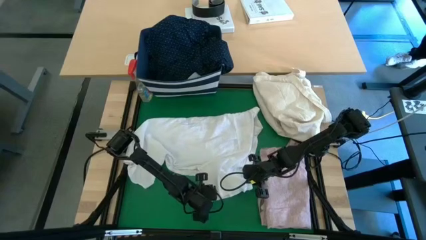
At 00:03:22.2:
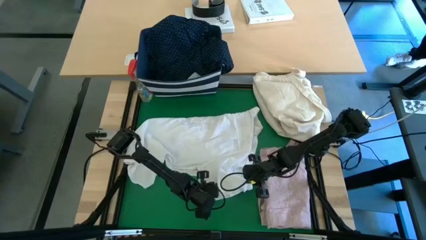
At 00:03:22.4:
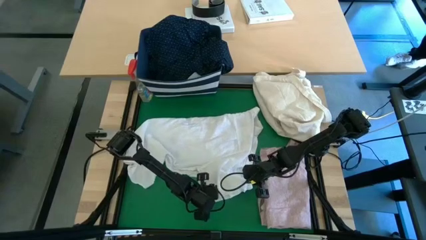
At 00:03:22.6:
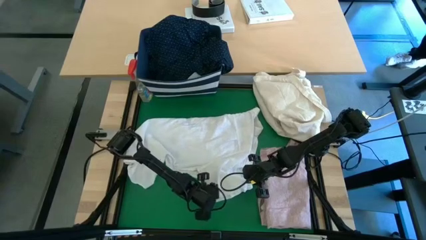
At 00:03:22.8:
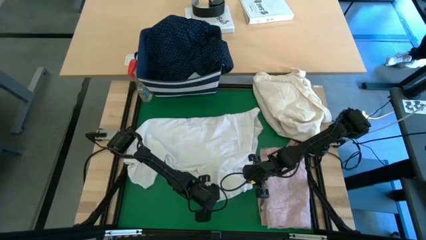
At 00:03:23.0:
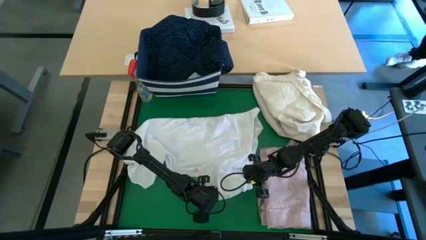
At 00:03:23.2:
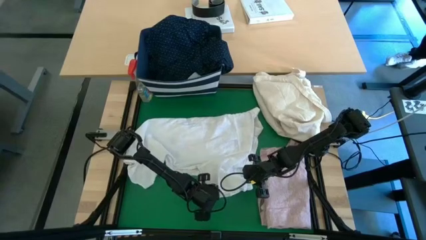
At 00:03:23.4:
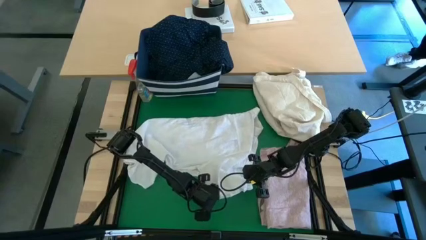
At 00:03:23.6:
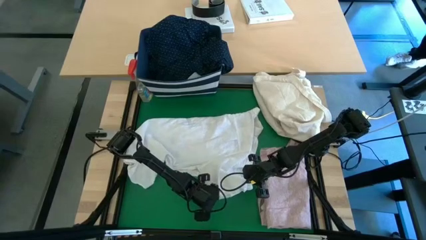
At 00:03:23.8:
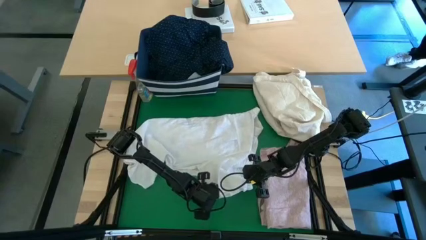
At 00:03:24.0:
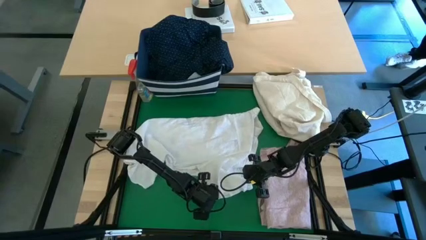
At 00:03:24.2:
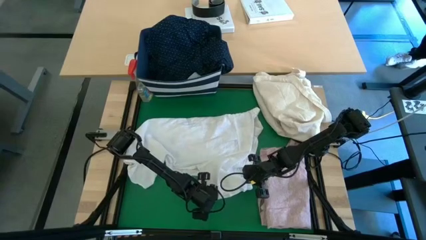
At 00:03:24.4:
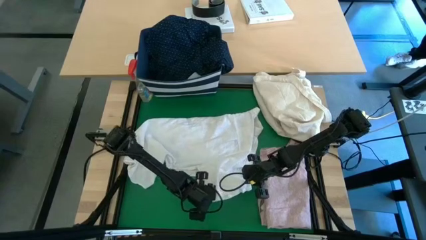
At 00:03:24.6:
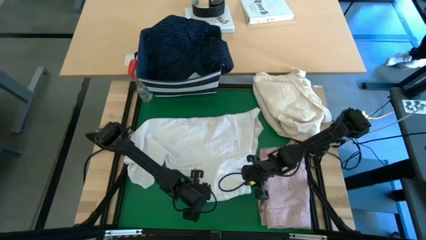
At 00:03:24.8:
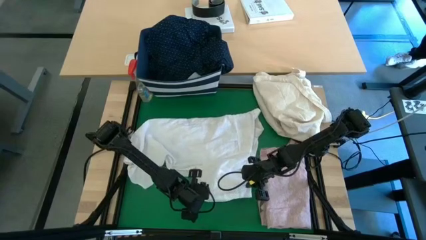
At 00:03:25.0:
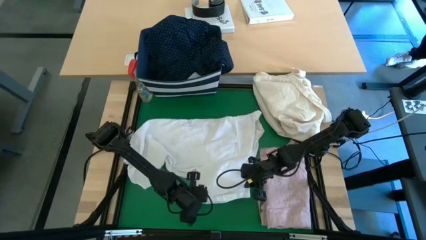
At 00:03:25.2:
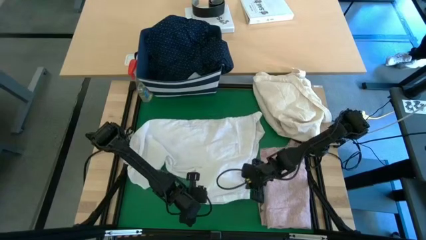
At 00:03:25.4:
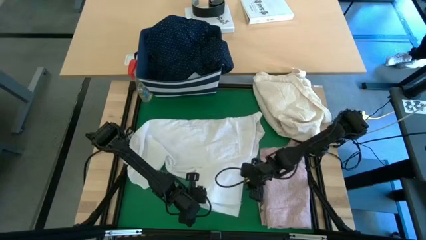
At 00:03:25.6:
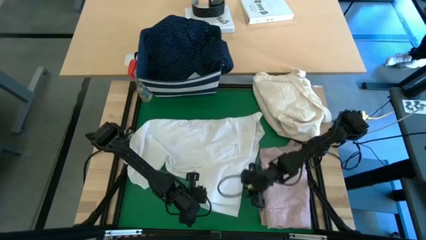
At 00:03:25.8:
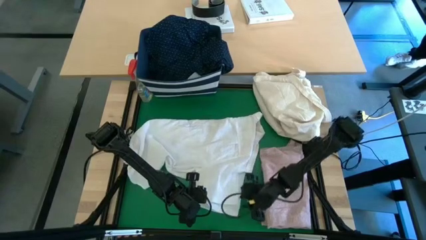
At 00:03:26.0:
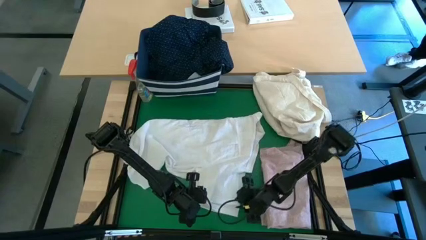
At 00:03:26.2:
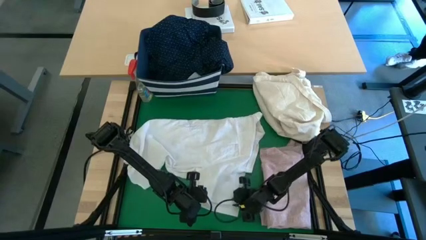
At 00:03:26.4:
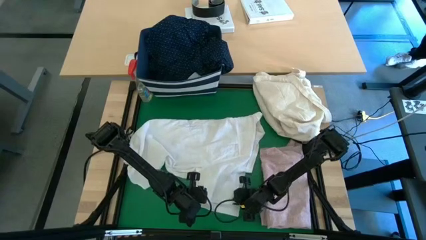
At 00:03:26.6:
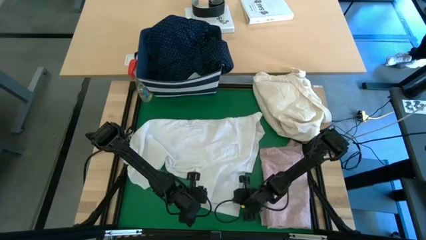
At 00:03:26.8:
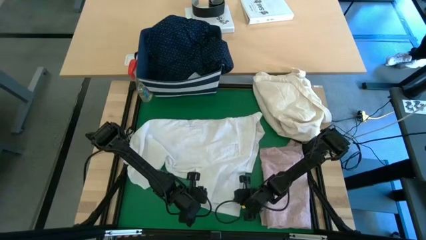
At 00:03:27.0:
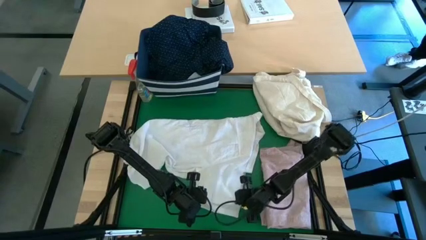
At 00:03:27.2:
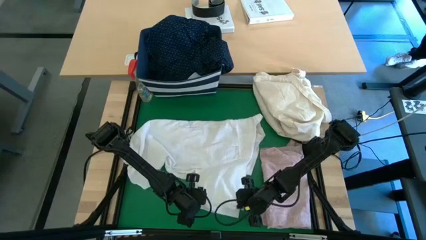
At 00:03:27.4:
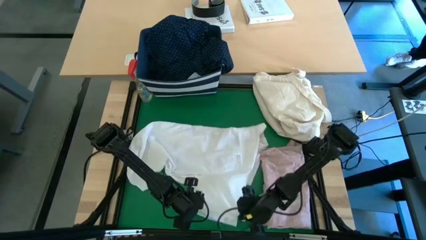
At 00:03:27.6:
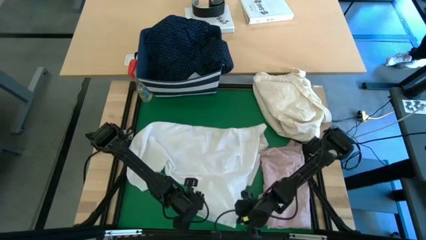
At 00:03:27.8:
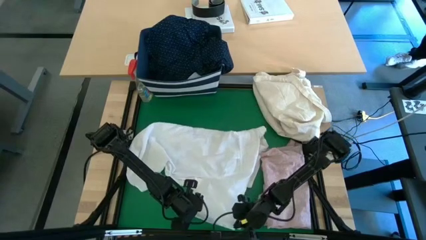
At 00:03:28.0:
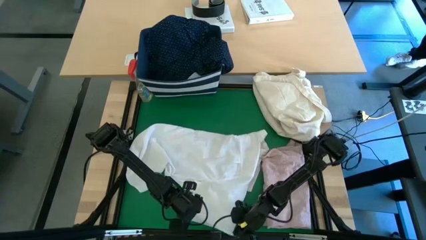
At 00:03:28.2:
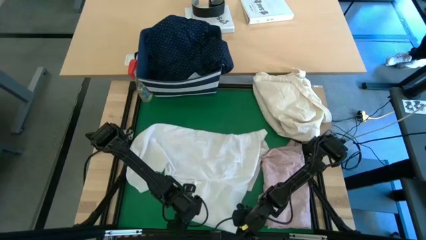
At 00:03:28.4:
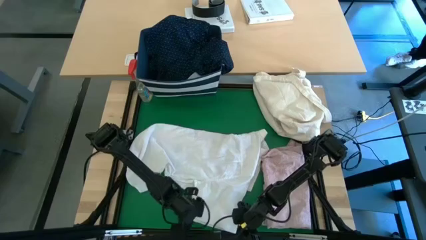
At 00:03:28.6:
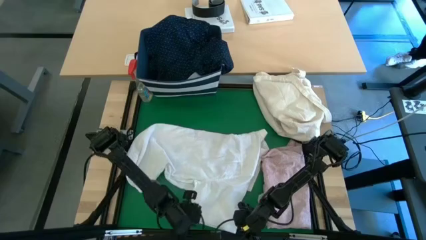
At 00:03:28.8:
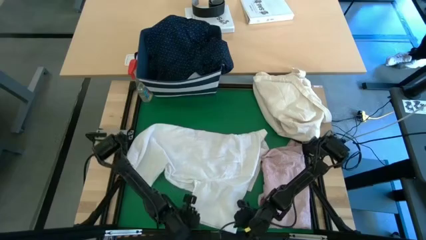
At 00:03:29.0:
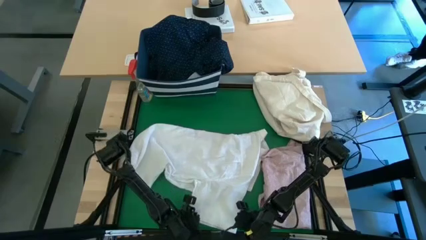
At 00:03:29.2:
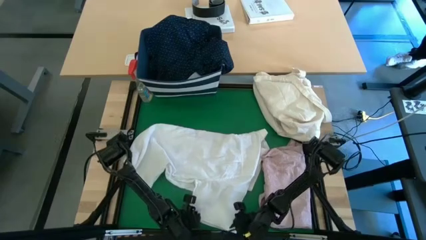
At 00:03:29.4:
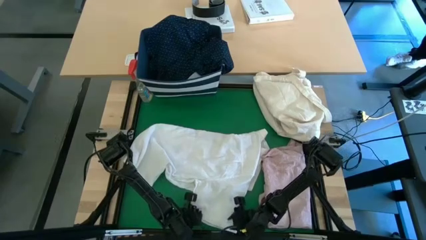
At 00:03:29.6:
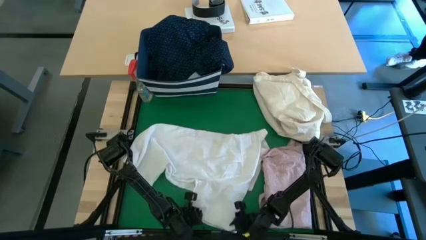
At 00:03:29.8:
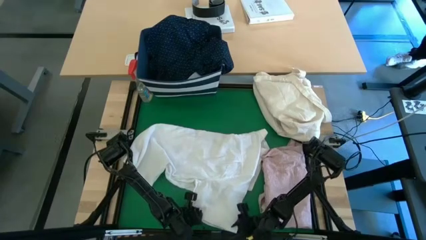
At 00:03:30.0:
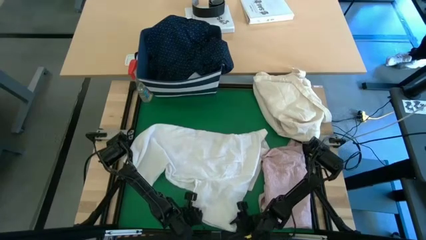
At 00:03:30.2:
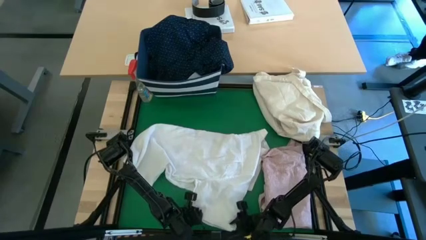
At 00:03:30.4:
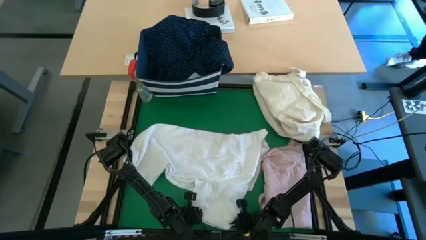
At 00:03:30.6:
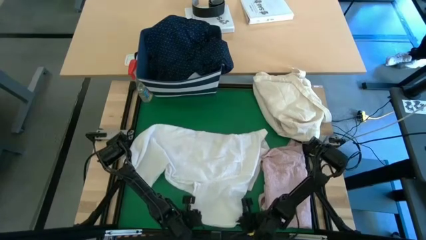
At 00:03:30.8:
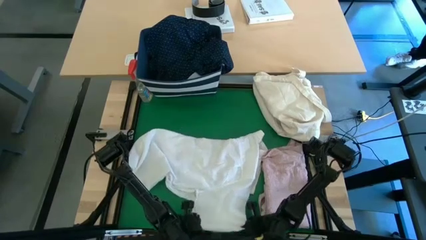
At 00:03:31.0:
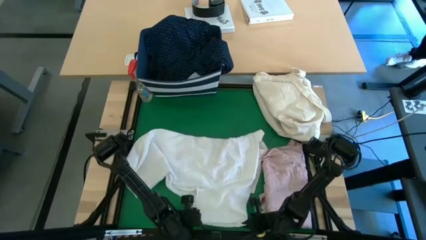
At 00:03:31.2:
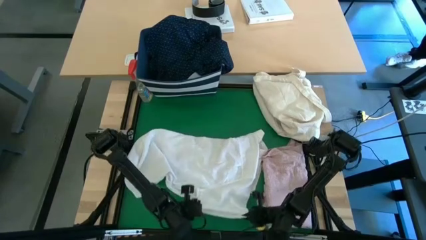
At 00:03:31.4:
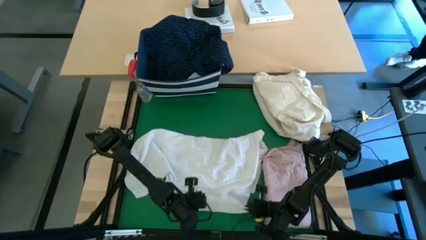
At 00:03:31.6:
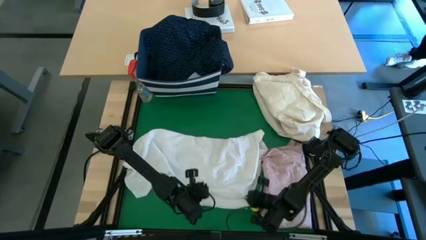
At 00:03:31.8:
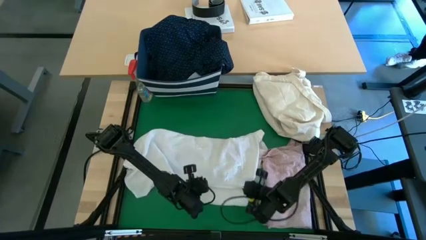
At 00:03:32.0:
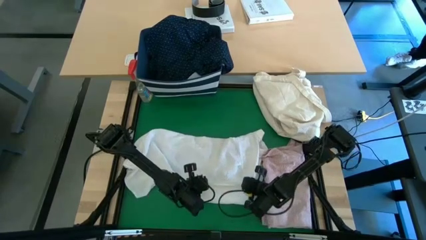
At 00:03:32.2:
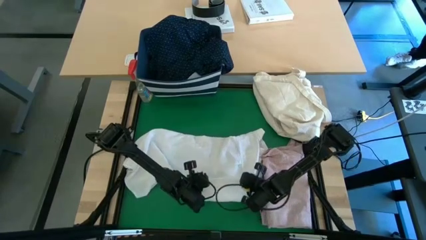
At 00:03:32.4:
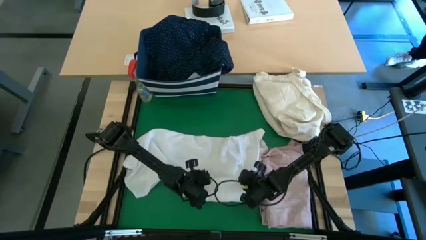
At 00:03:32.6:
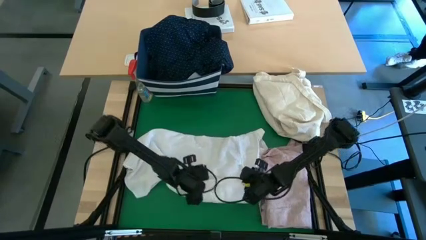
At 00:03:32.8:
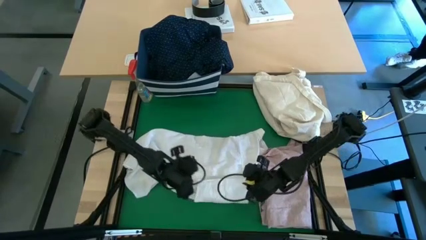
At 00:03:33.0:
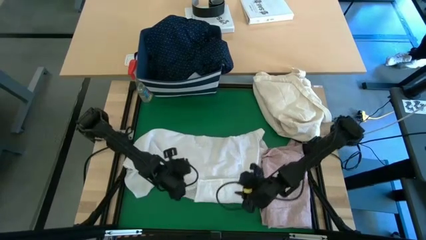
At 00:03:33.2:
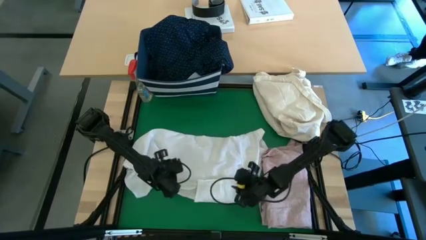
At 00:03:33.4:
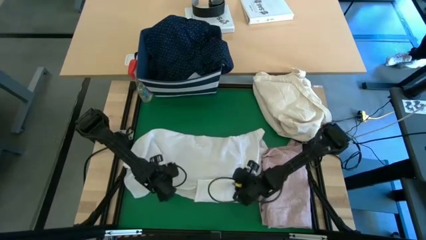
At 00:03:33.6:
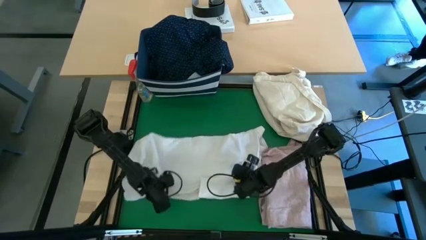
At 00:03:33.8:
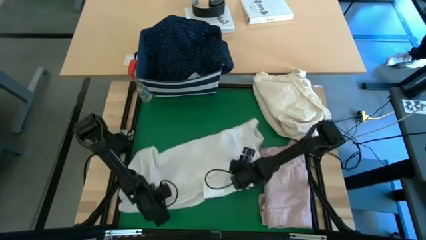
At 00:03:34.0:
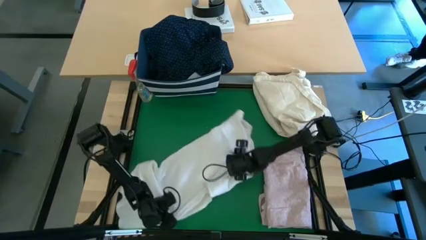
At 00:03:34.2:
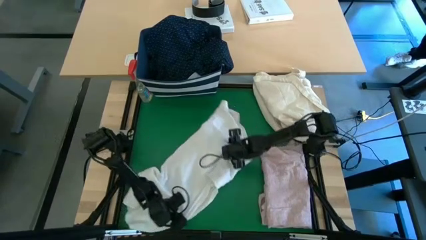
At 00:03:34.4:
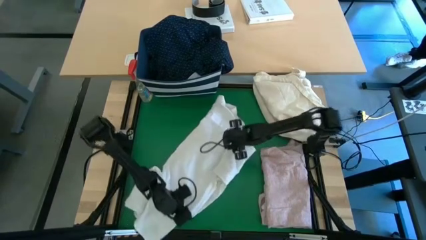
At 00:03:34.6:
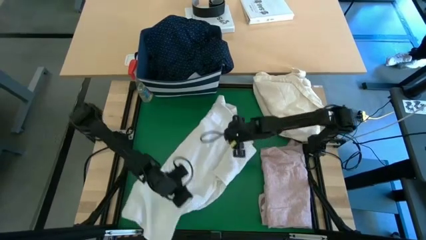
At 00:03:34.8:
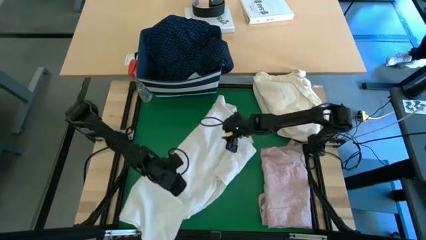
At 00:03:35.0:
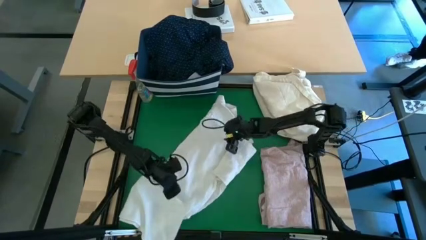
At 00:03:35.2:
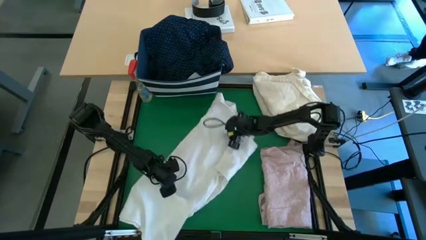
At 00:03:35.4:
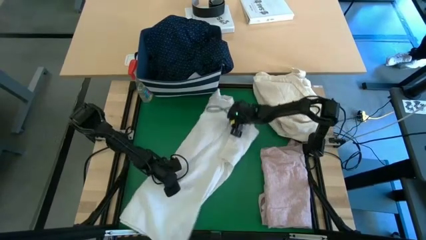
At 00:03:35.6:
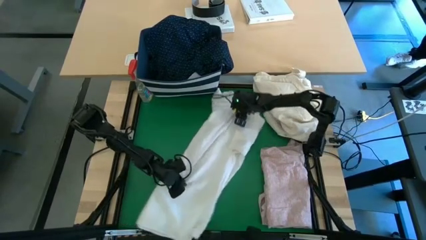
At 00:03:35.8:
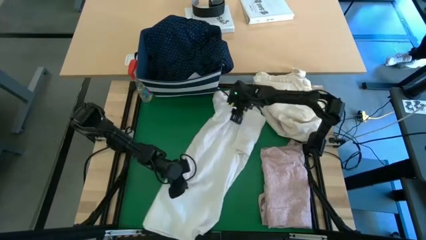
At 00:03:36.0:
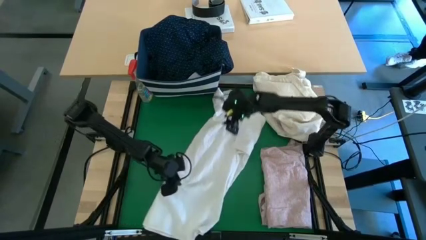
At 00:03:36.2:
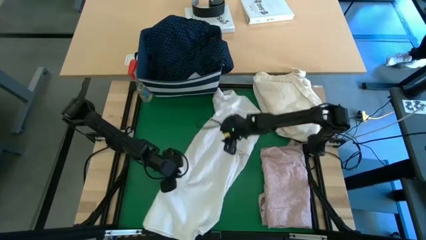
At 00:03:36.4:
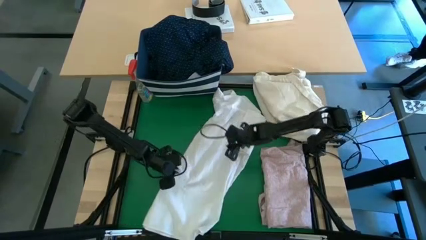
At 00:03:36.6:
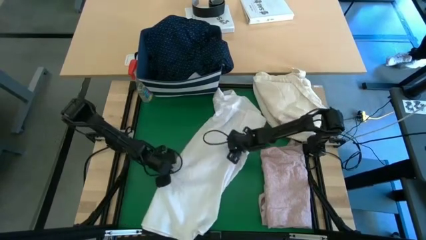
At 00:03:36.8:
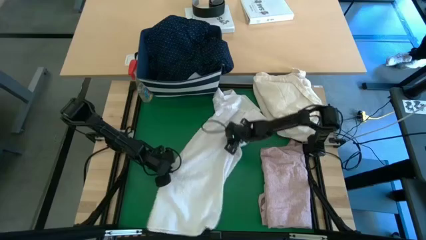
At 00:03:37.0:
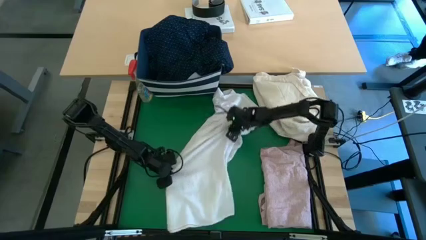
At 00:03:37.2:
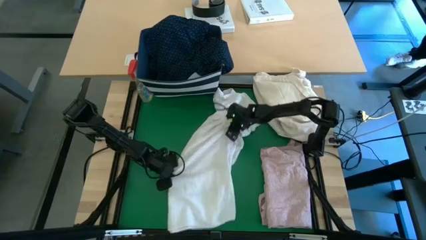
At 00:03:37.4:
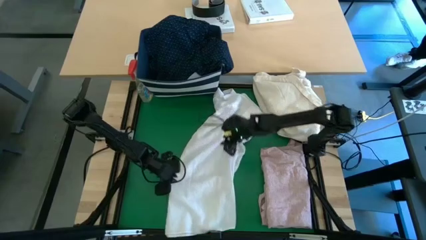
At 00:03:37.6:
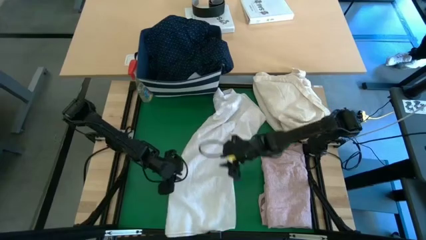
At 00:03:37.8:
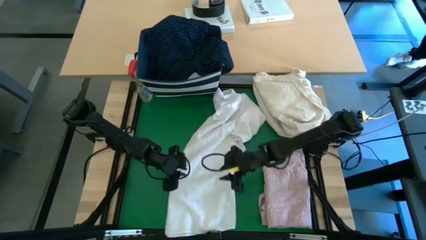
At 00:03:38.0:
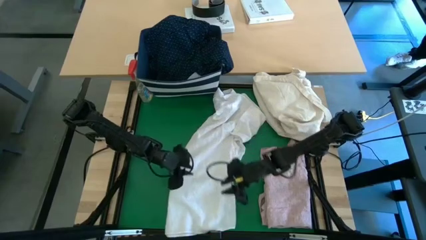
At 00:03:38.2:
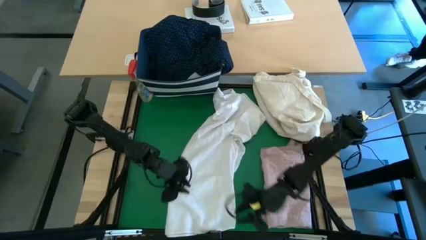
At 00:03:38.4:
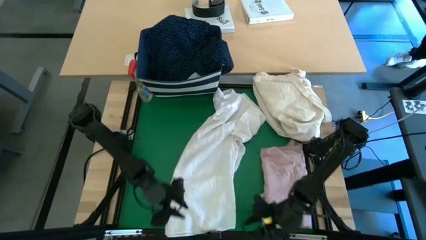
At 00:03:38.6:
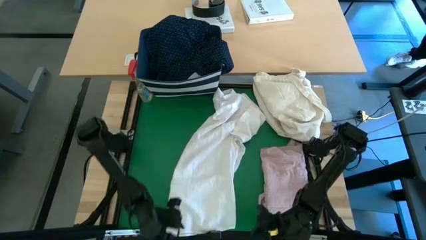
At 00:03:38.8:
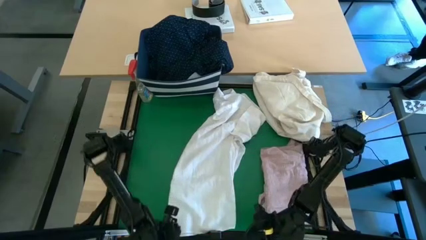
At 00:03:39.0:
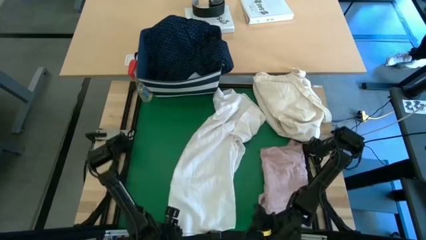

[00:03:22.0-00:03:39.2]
Task: Fold laundry
Fold the white polo shirt
